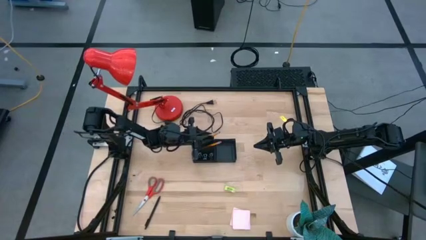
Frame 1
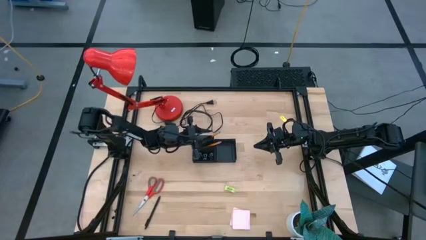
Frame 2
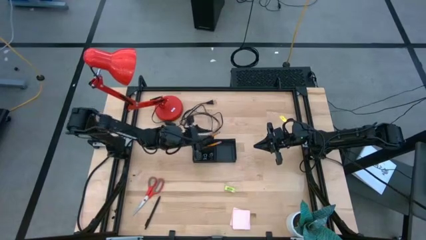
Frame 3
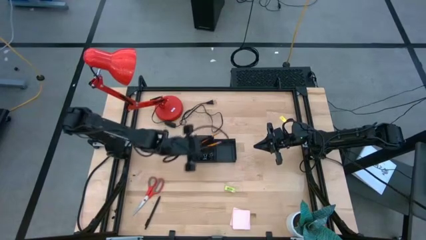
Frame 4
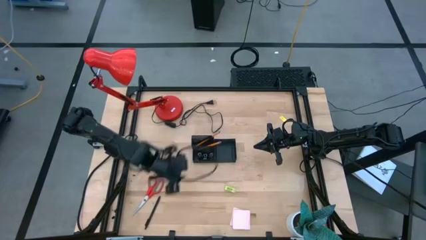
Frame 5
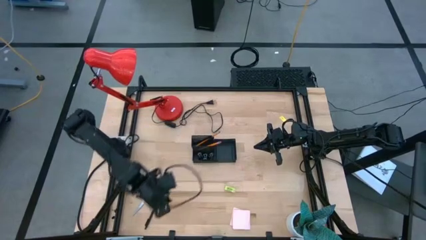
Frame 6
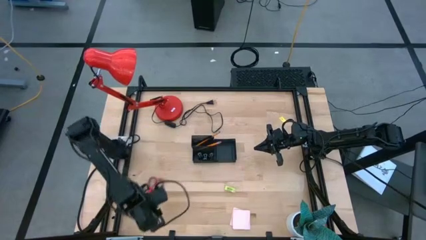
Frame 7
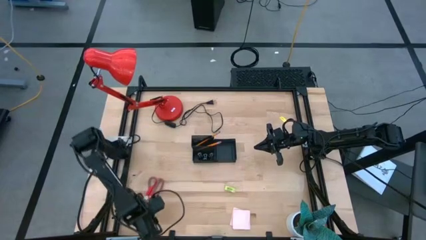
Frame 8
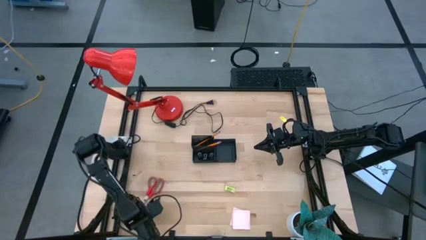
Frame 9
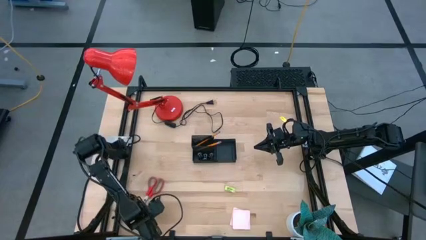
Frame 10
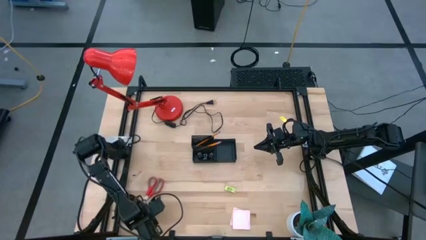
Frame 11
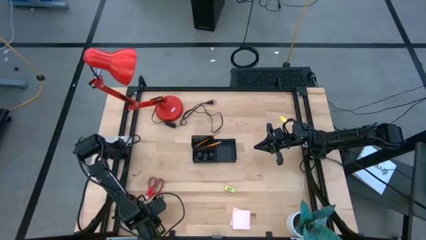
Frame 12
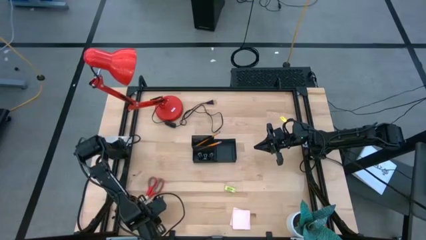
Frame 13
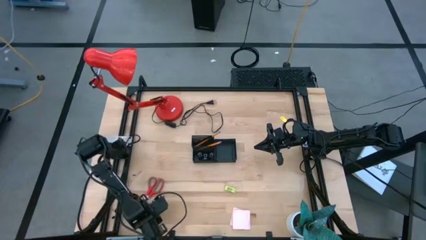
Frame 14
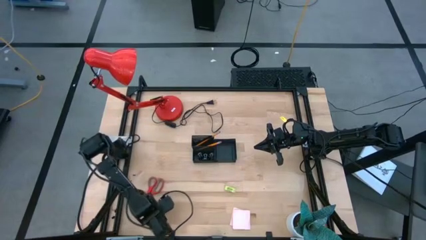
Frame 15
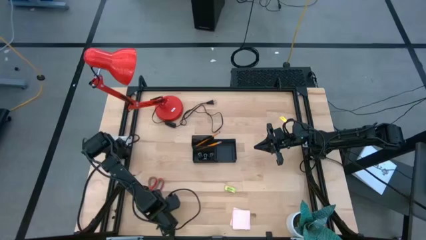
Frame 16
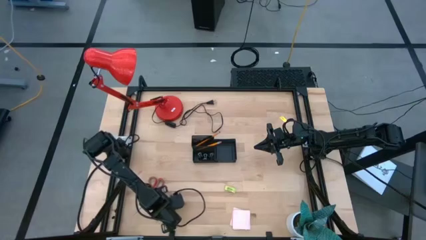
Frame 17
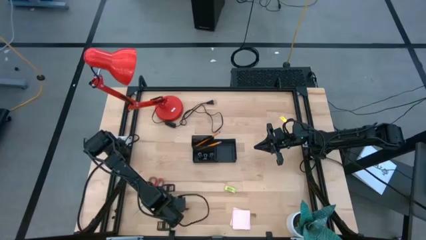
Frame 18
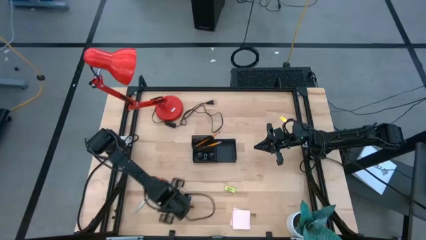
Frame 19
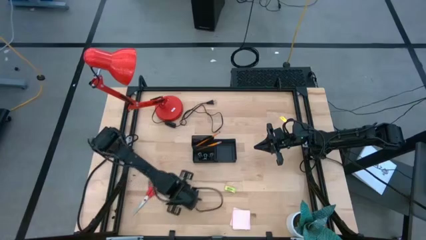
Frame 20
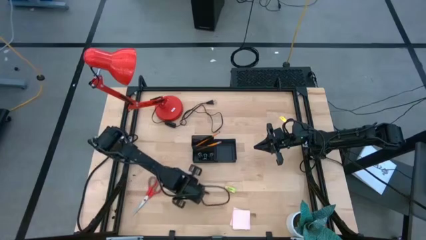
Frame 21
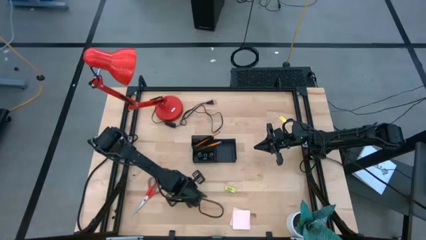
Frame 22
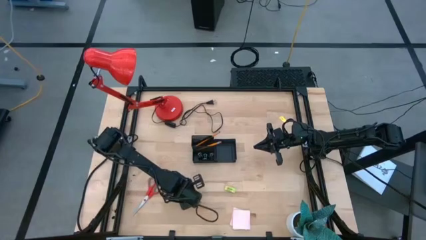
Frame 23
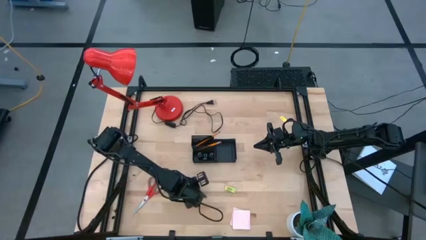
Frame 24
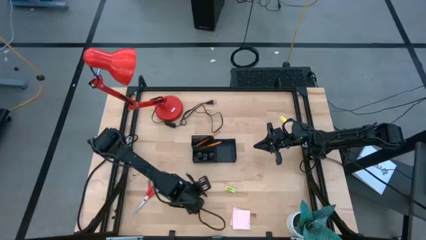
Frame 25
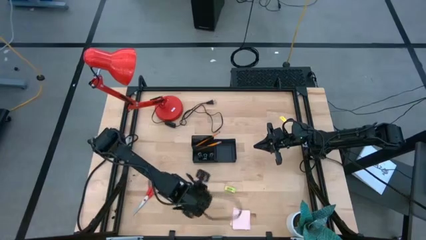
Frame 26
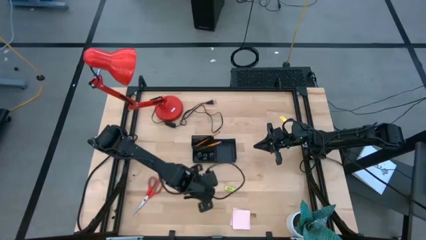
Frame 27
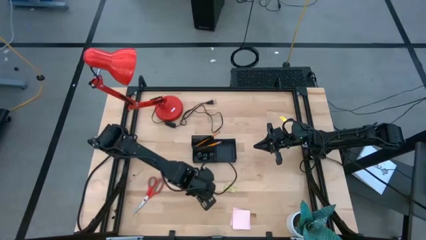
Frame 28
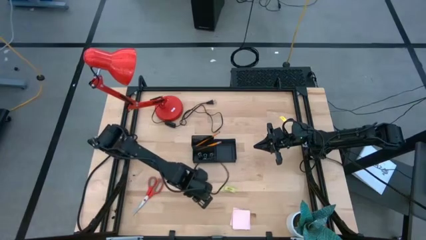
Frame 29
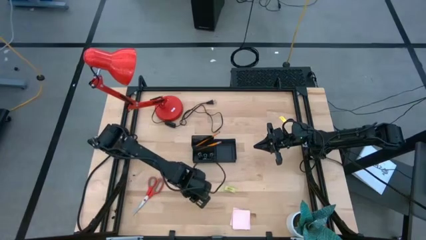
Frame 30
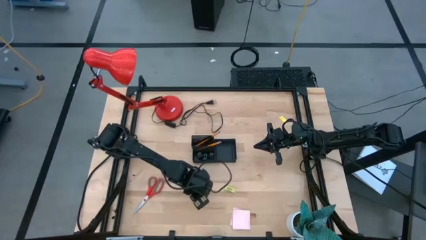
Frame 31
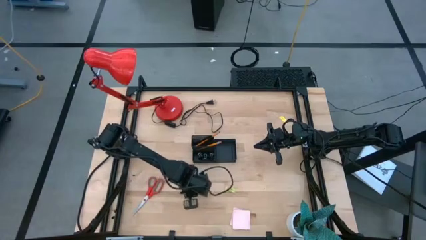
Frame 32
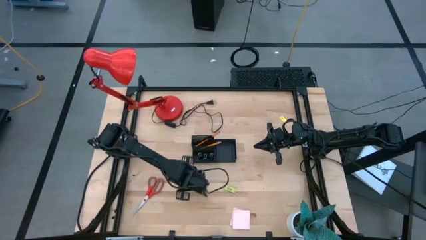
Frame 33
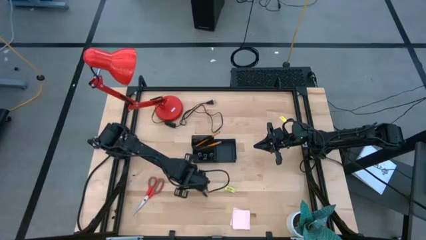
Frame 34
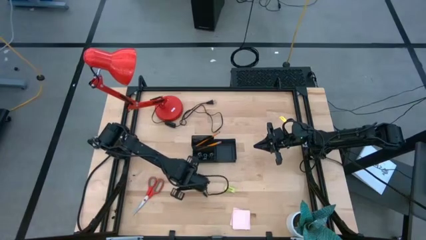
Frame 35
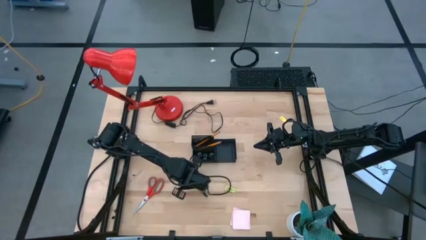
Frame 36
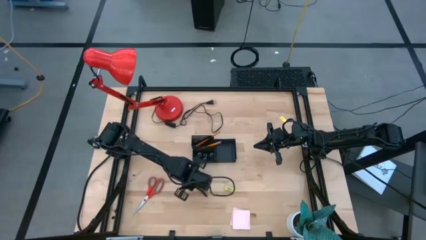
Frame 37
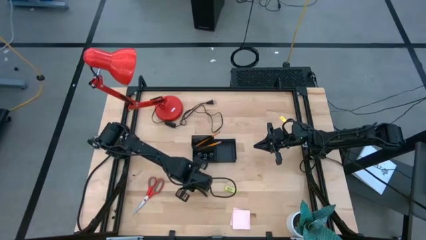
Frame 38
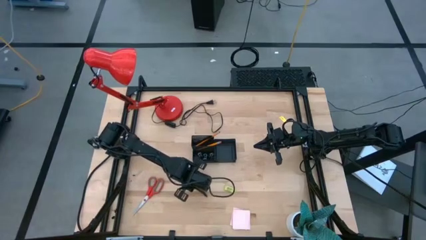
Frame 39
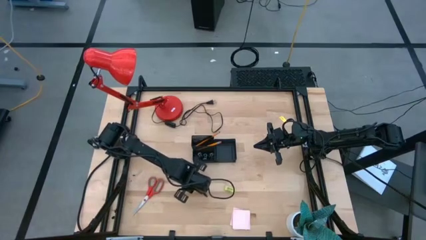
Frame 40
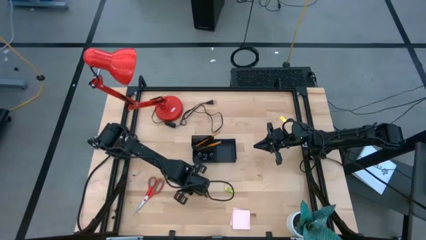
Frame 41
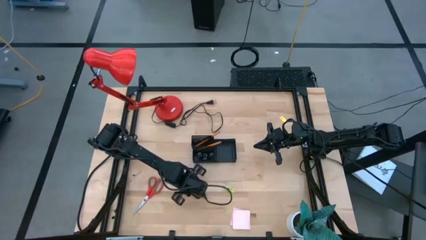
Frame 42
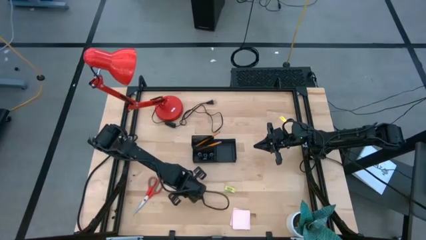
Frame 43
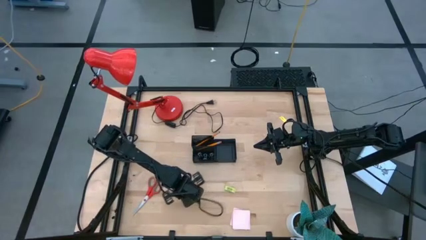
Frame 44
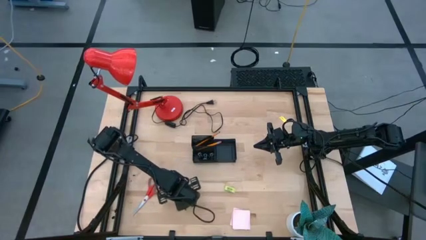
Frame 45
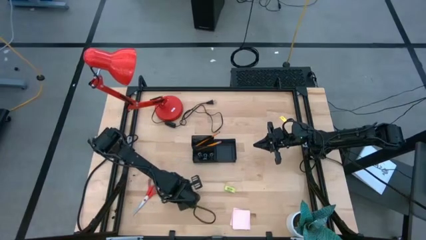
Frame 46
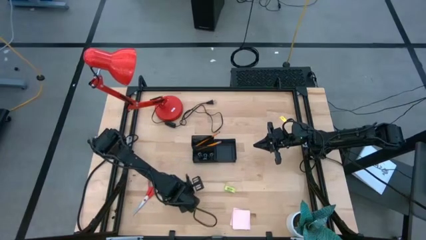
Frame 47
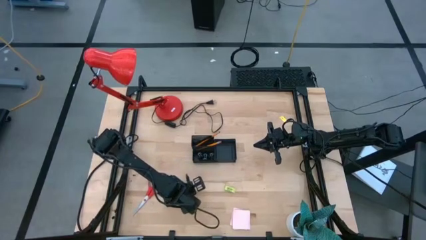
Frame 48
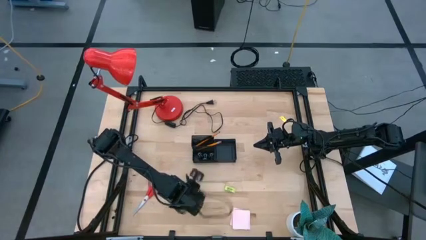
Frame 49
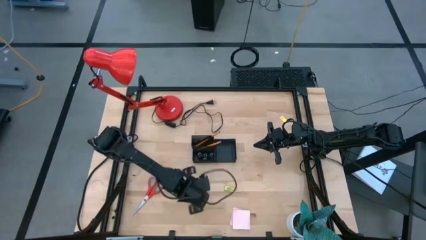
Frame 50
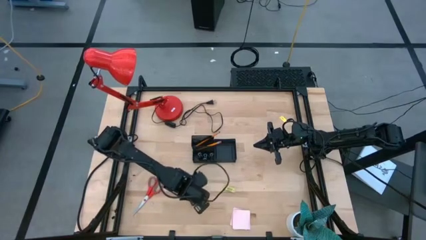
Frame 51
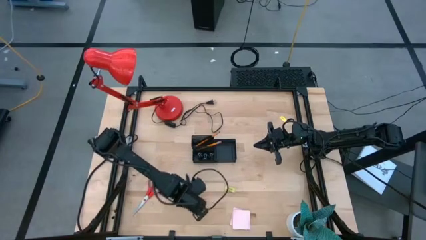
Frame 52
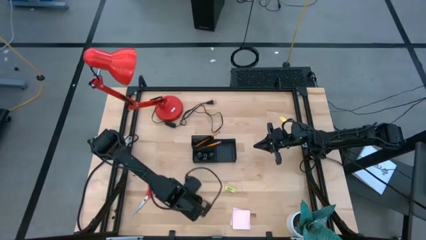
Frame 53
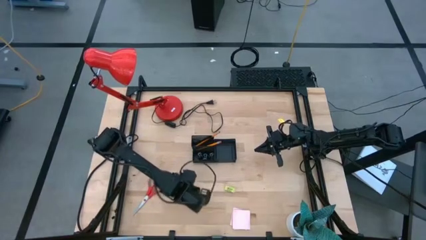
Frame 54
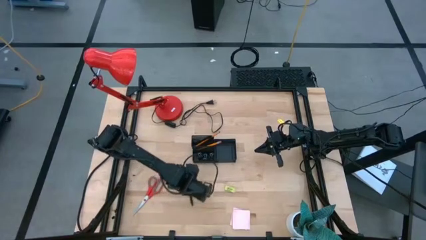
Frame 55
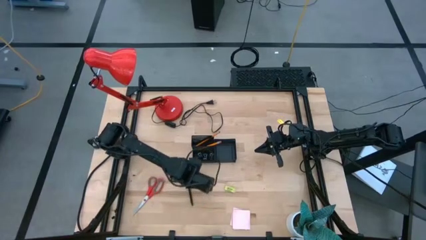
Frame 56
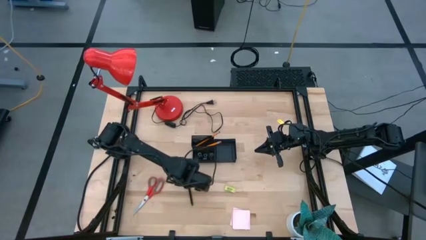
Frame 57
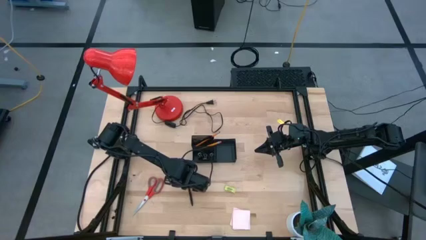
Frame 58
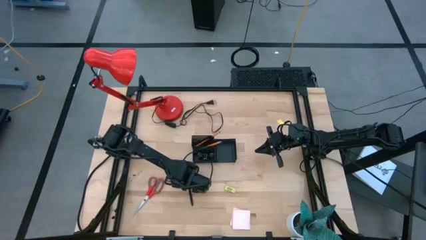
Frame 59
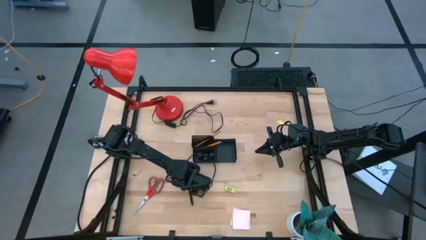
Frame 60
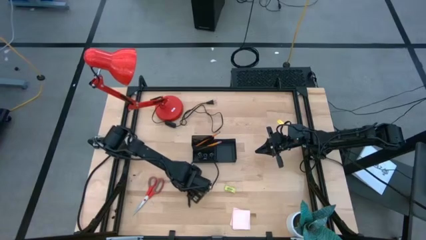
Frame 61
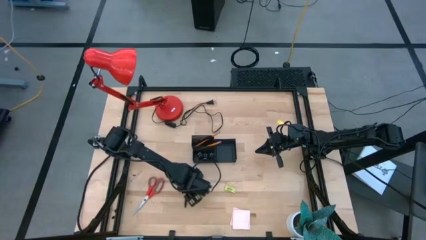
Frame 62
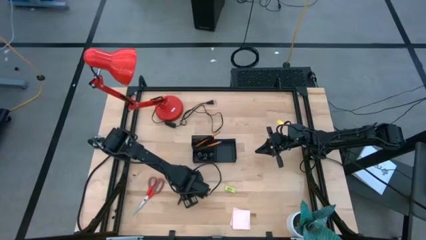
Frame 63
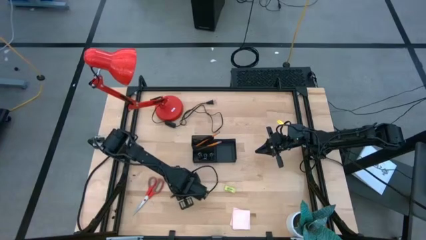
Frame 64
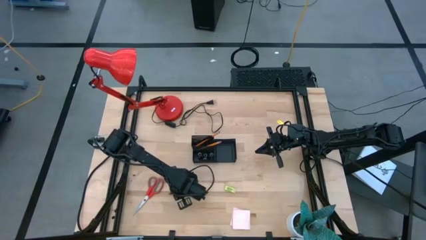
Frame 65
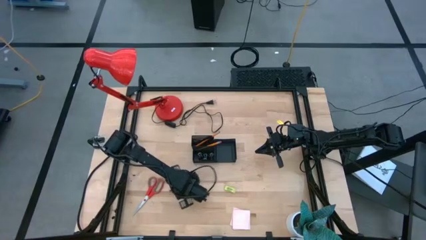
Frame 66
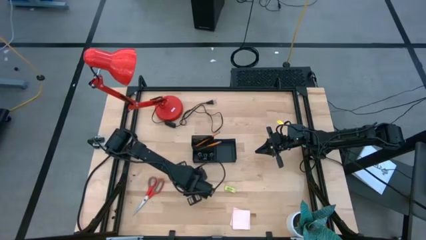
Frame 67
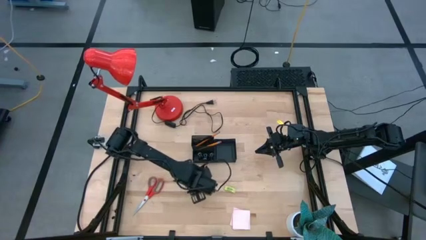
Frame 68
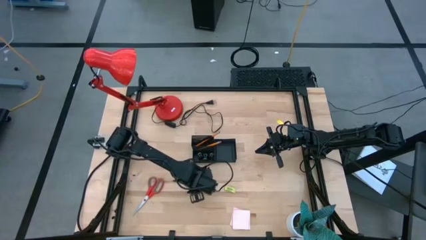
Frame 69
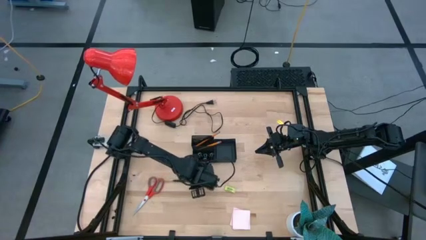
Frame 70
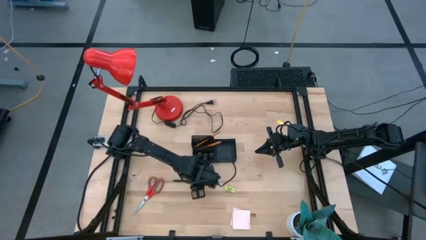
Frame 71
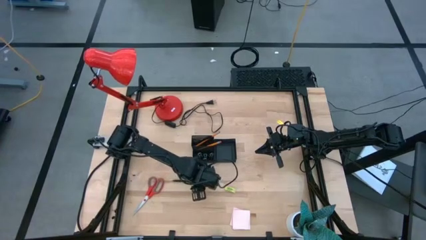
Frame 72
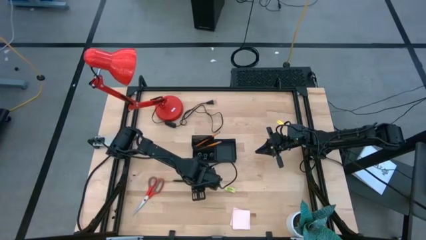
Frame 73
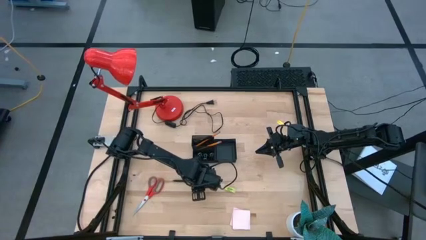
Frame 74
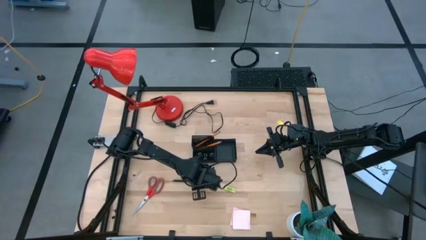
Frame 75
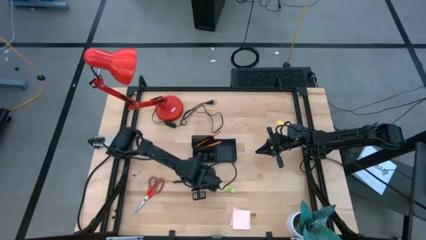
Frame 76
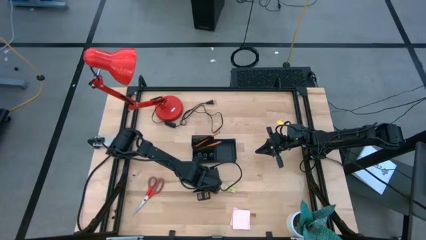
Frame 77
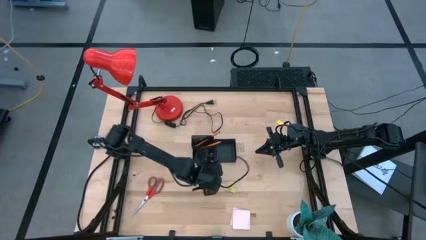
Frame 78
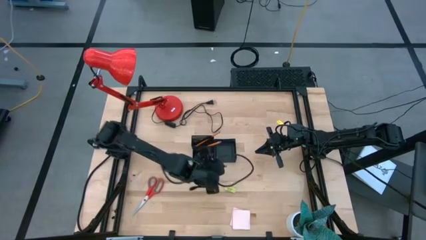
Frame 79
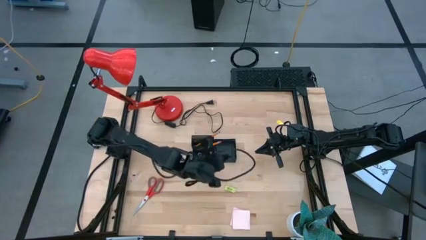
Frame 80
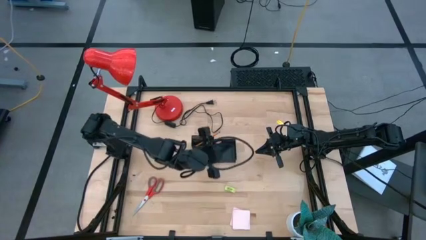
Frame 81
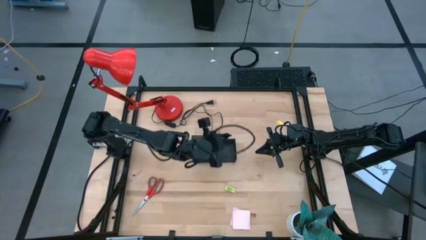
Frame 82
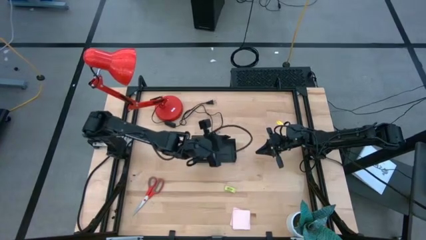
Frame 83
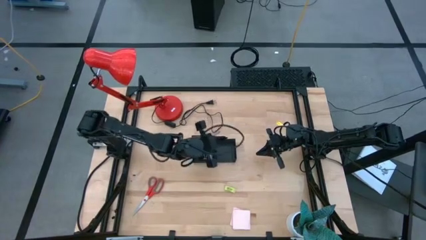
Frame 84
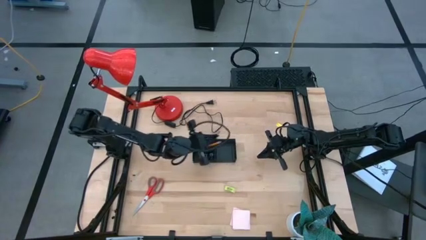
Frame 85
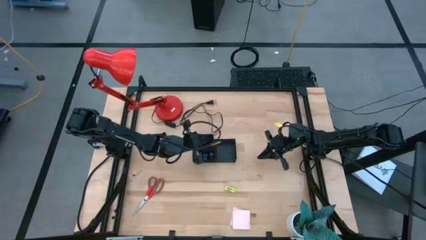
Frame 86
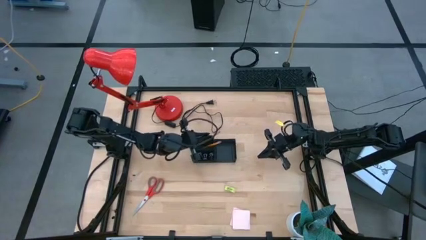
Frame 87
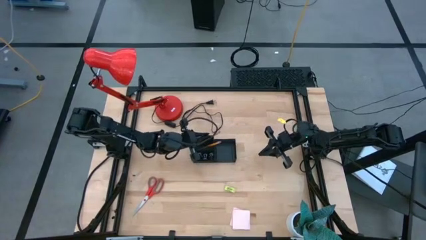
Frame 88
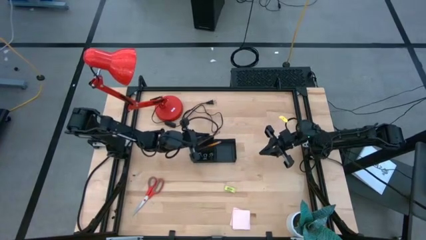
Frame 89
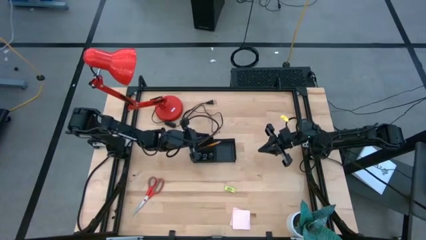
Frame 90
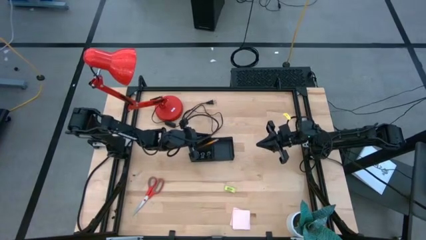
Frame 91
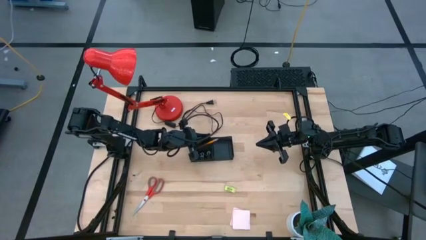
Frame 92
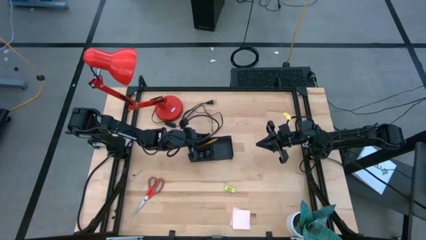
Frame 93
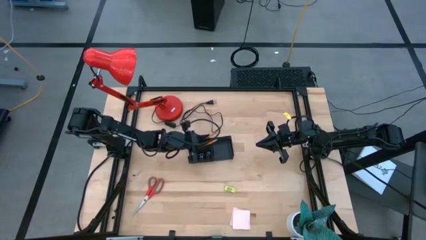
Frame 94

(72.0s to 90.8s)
Task: Pick and place office supplies into organizer
Put the black pen into the desk organizer
